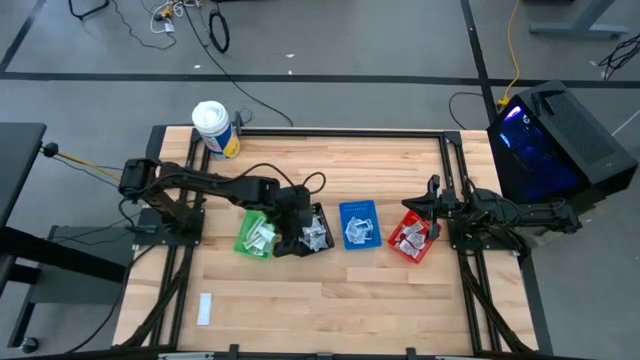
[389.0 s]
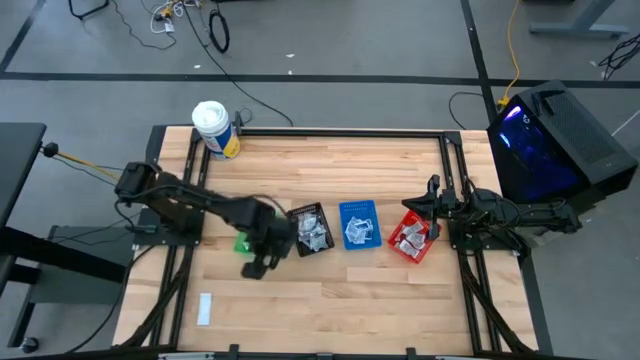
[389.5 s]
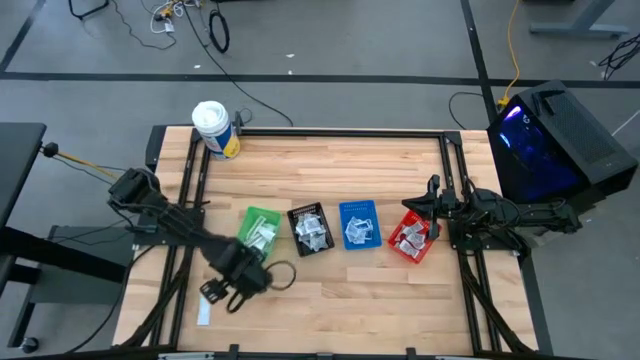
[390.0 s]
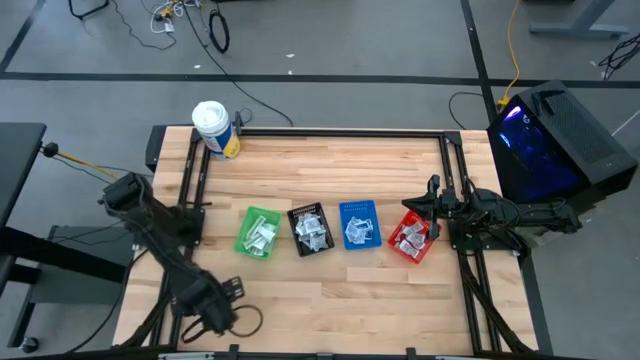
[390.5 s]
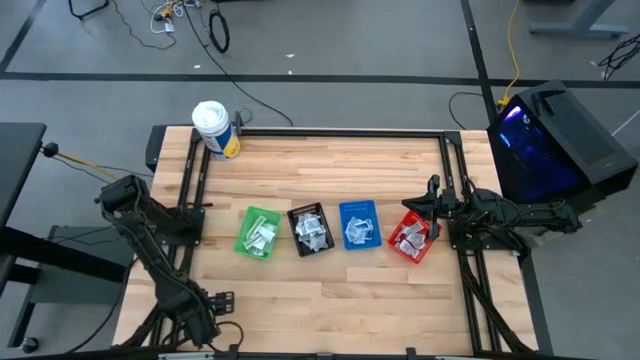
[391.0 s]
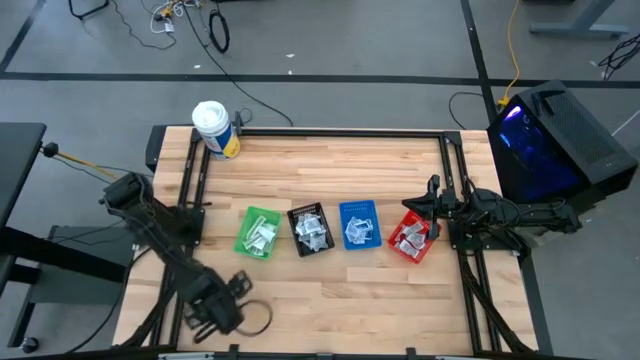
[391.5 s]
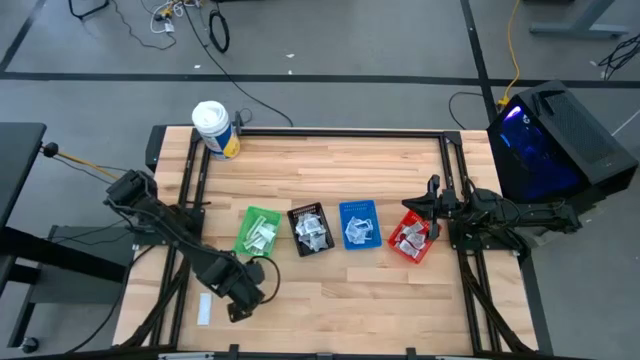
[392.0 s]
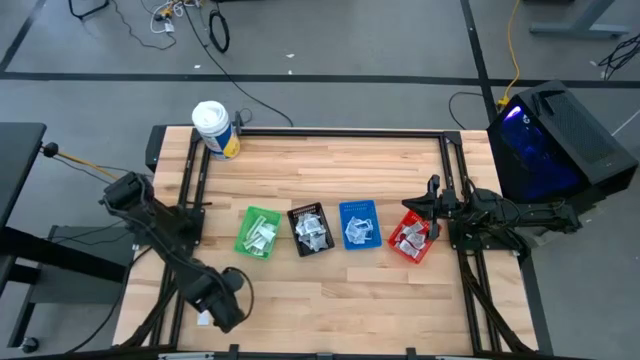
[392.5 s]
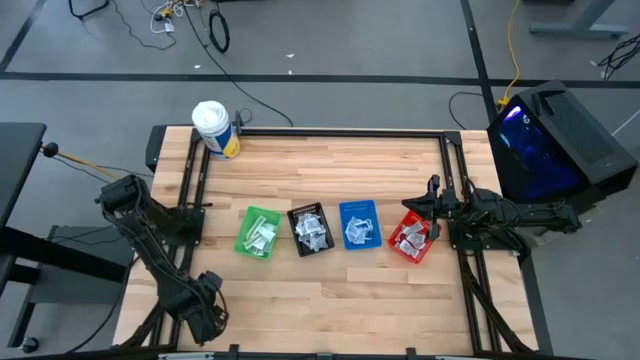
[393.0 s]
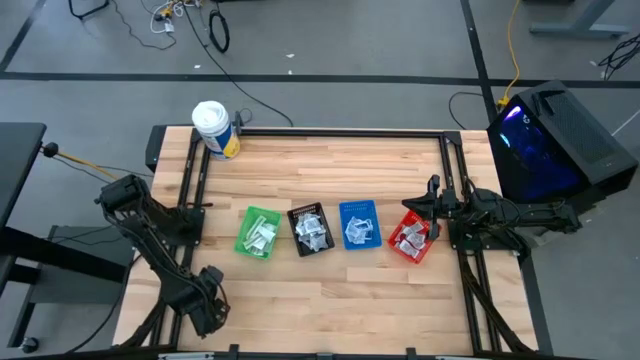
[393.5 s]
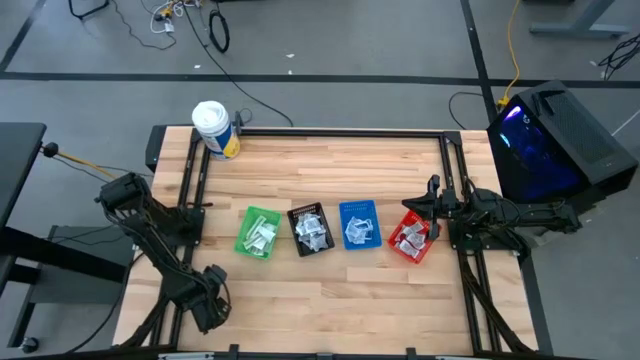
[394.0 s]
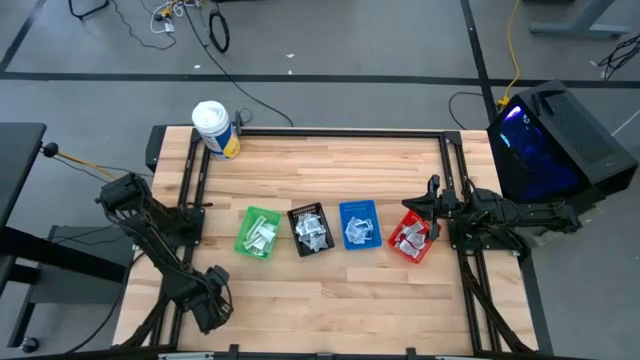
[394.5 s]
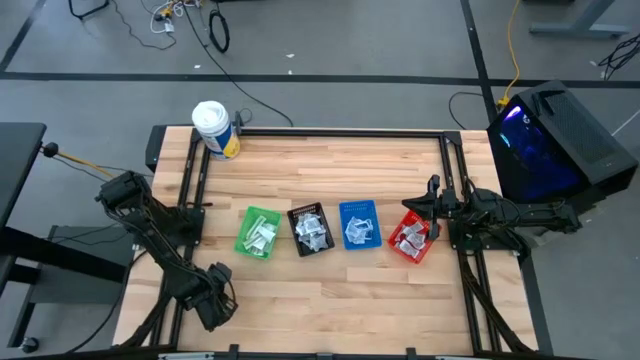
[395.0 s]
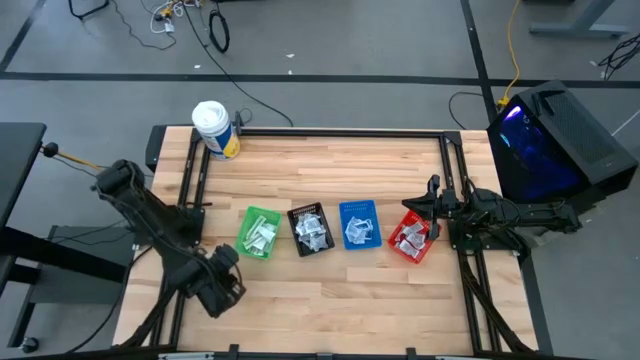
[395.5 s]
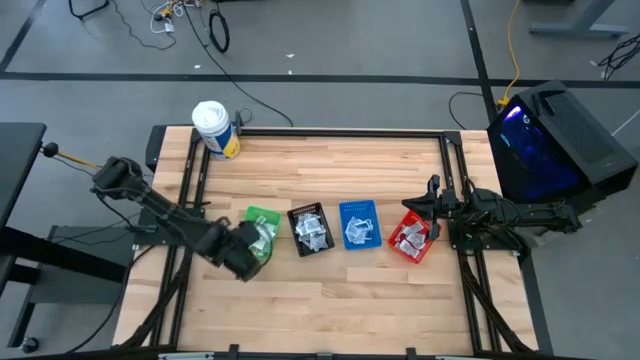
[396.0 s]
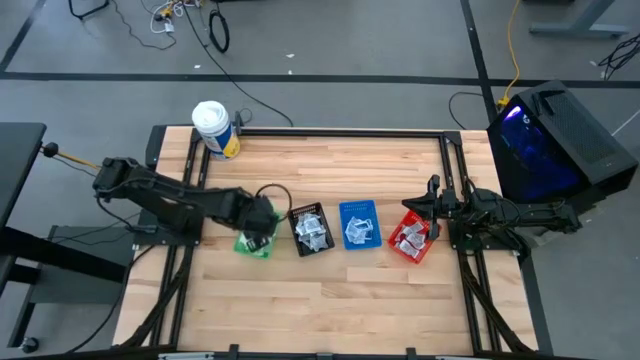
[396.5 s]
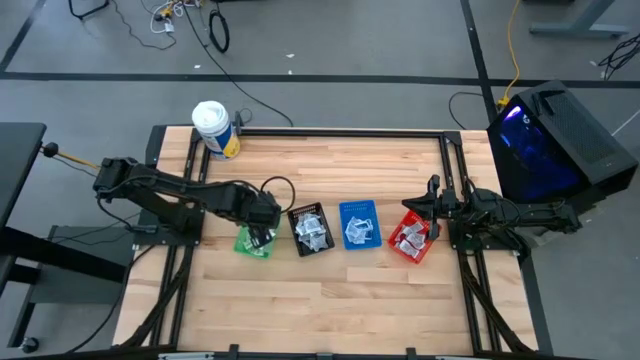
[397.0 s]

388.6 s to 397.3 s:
Task: Pick & Place First Aid Supplies
Put the bandage into the green basket

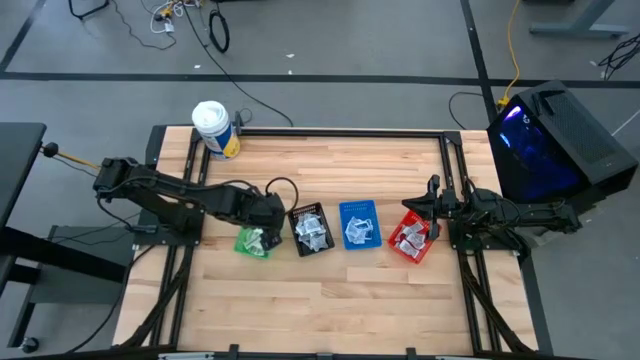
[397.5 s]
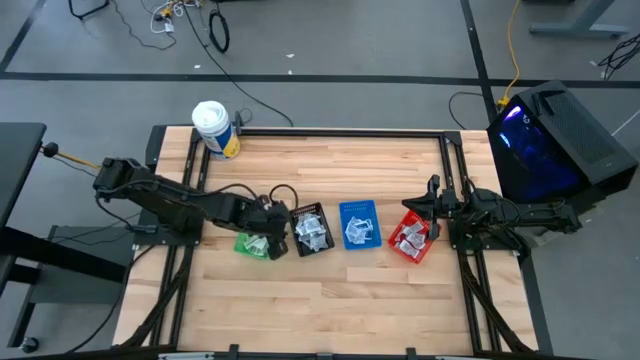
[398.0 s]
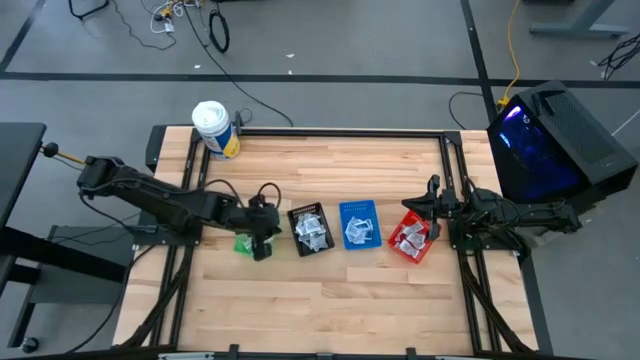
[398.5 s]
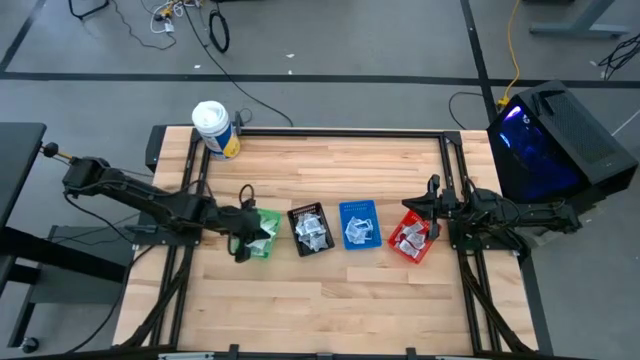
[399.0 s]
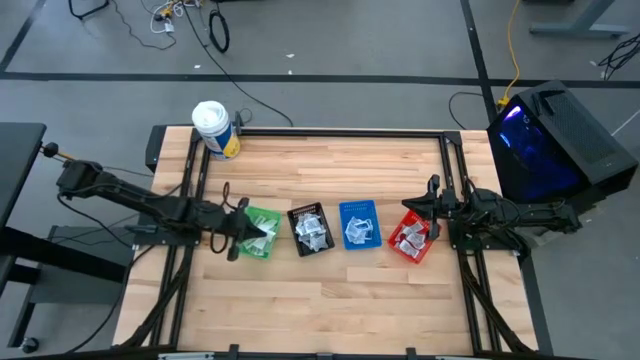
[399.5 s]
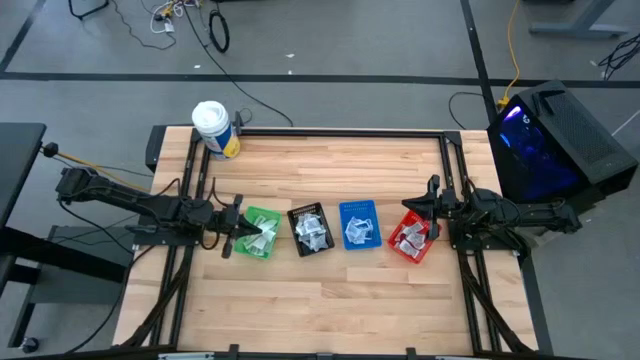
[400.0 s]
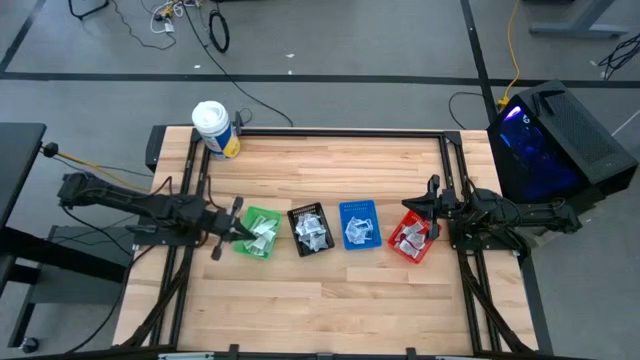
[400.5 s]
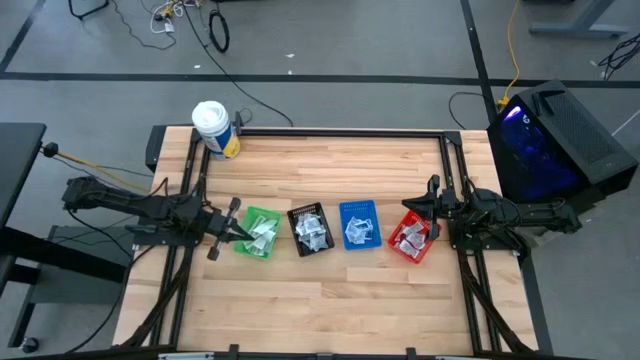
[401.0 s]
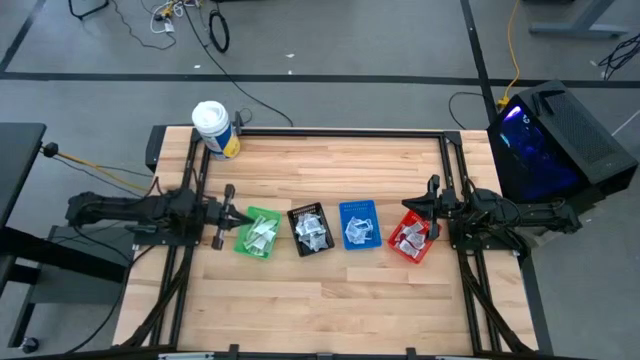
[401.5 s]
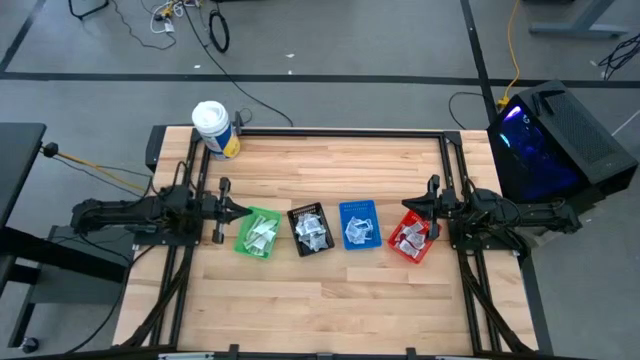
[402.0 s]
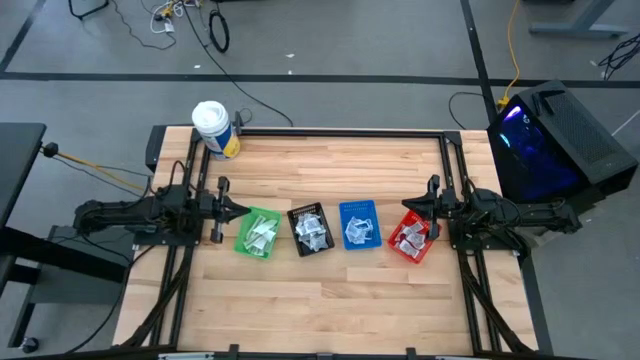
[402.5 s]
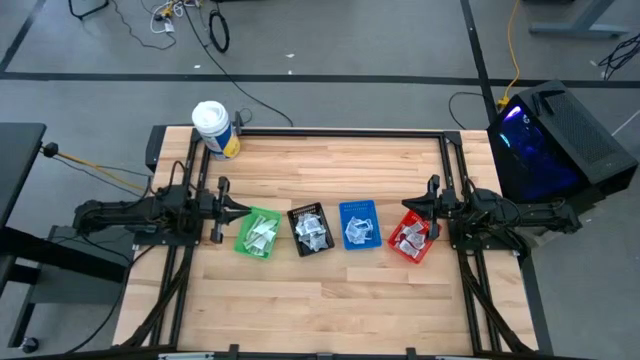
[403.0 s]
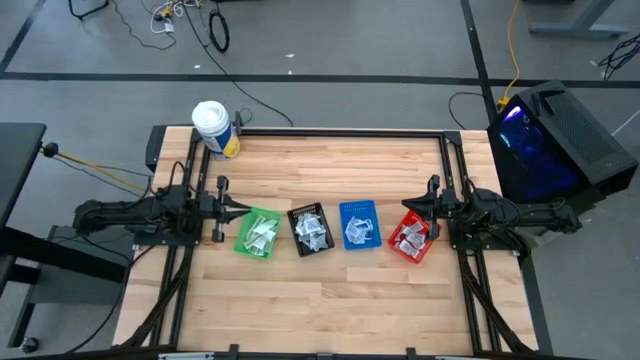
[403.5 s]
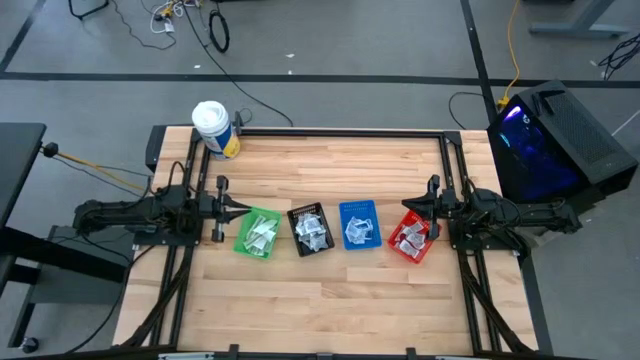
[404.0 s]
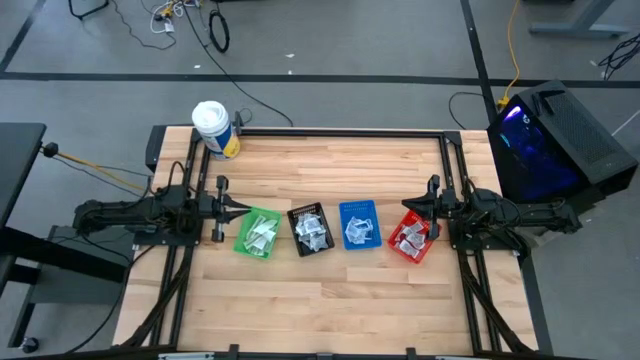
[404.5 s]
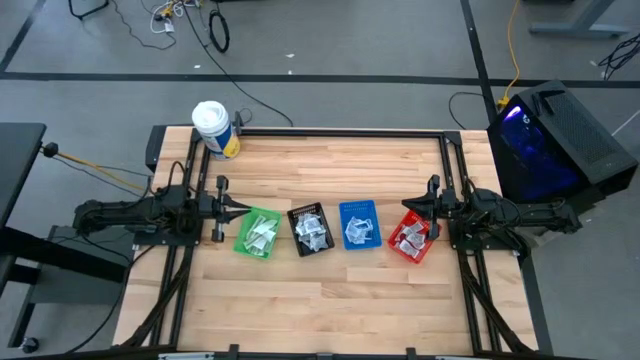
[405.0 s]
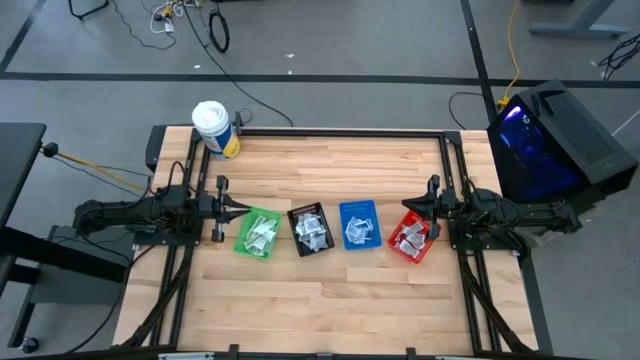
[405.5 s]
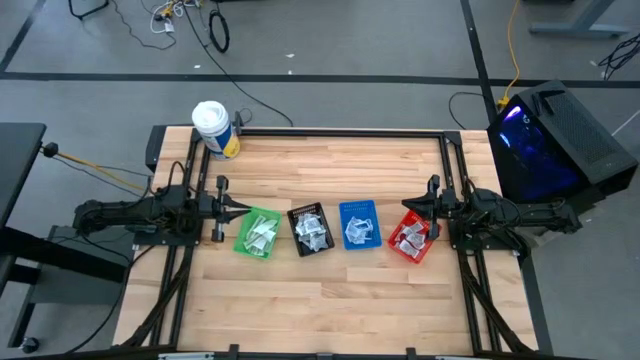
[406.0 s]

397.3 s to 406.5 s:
Return to Home Position
